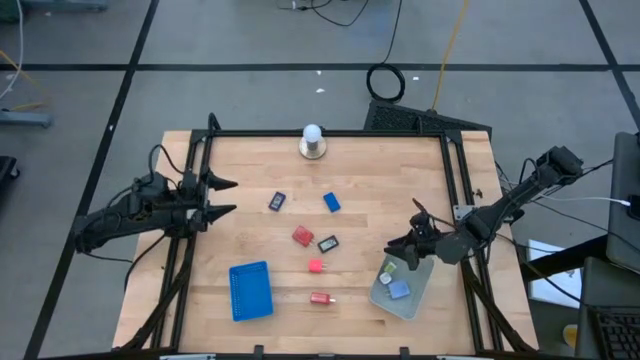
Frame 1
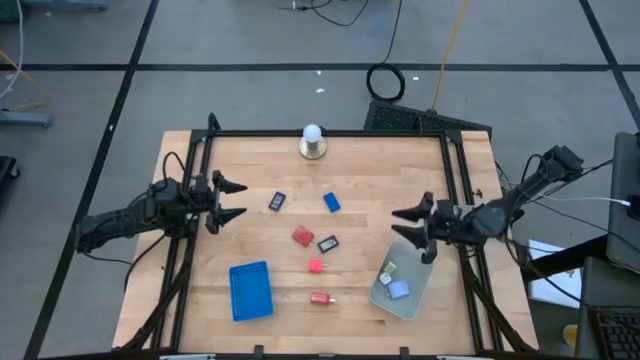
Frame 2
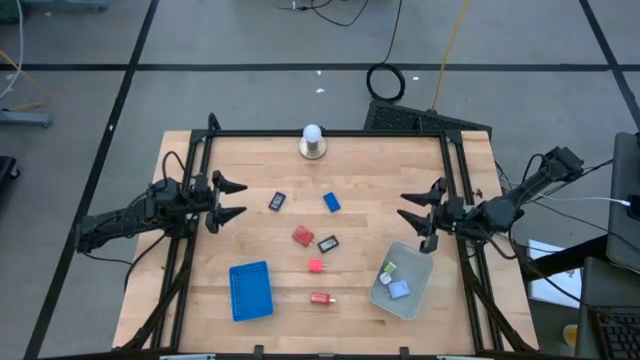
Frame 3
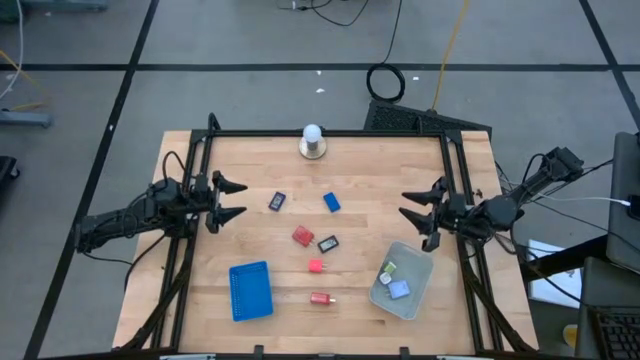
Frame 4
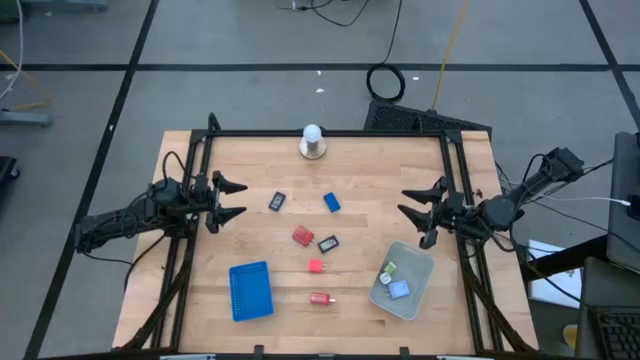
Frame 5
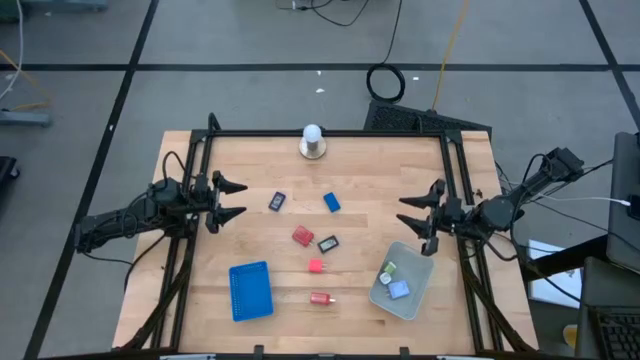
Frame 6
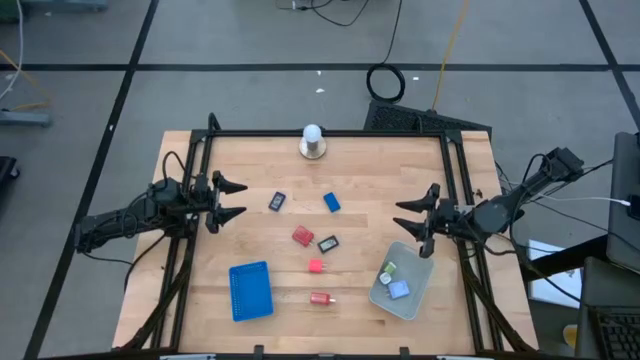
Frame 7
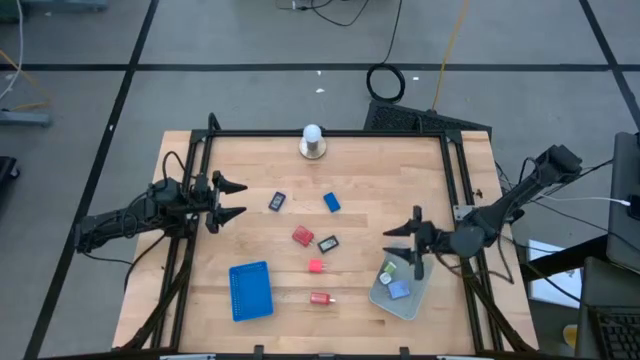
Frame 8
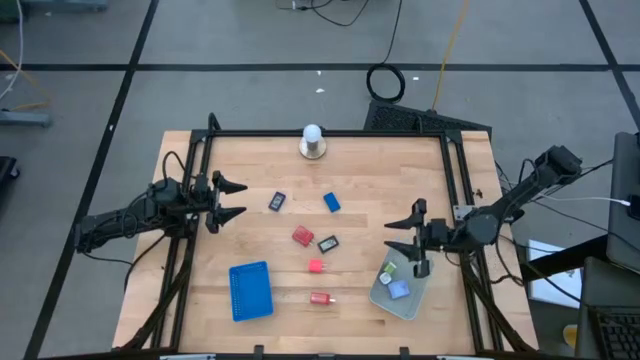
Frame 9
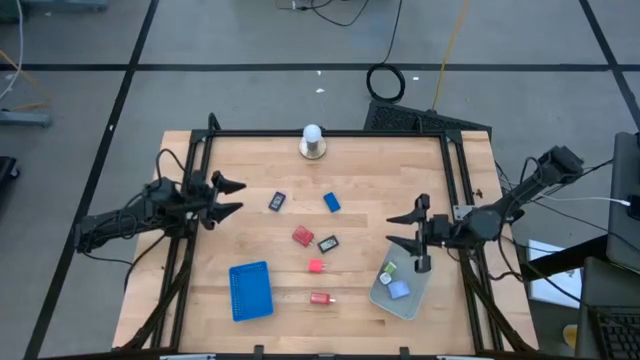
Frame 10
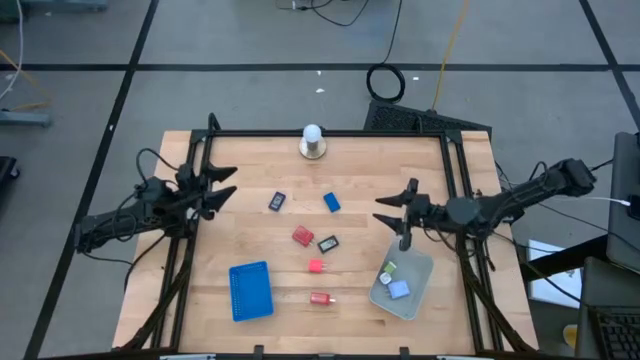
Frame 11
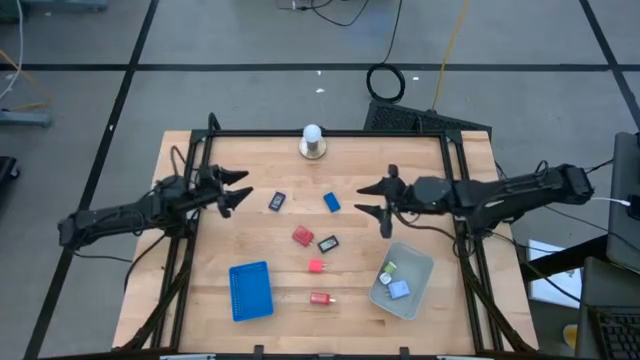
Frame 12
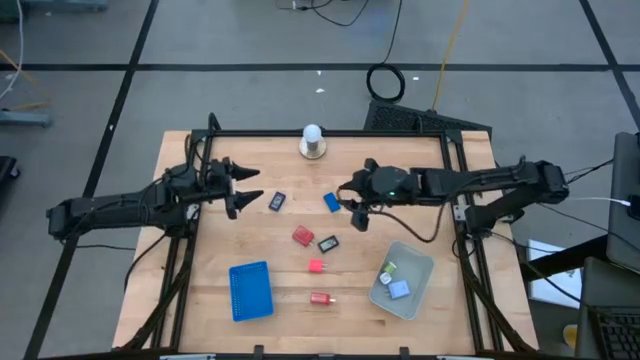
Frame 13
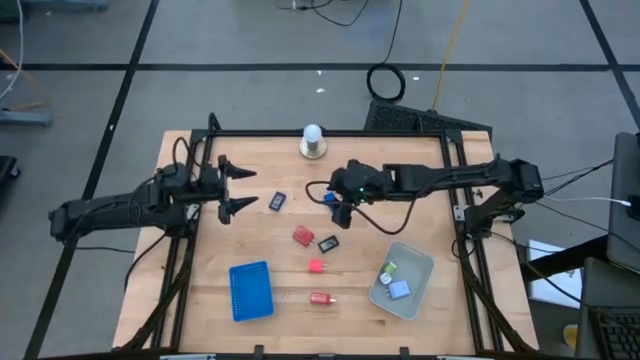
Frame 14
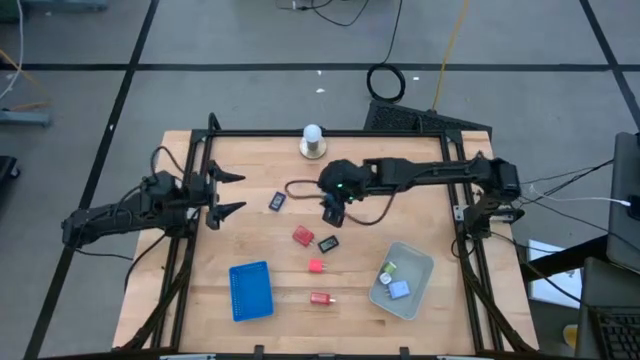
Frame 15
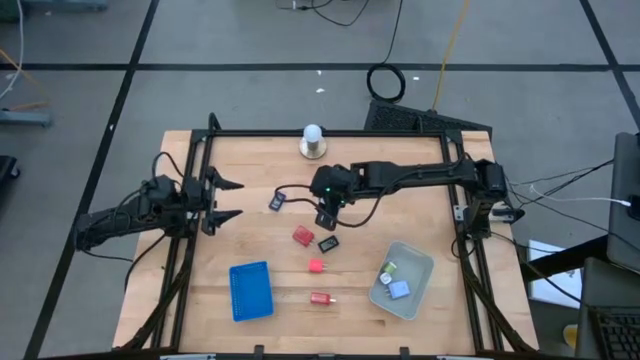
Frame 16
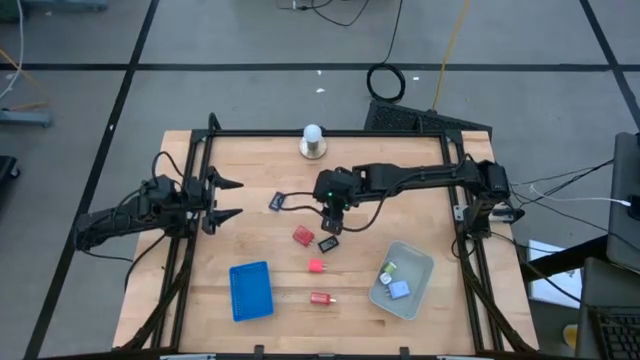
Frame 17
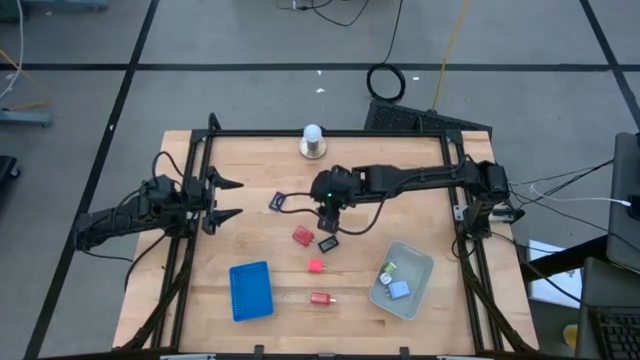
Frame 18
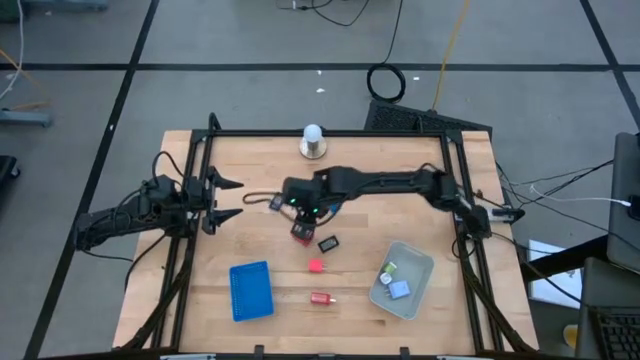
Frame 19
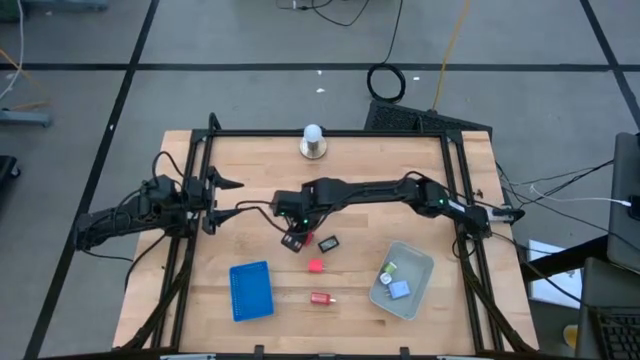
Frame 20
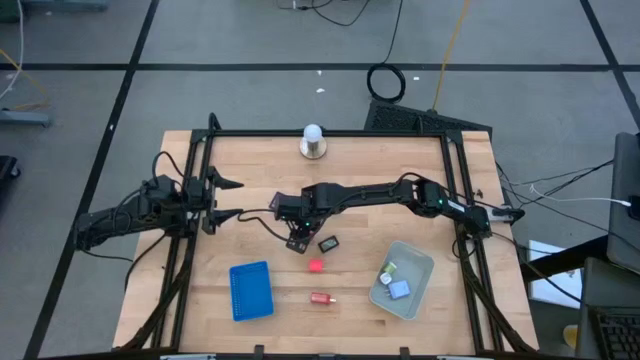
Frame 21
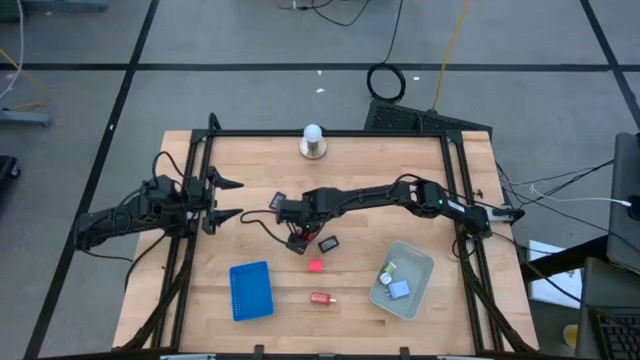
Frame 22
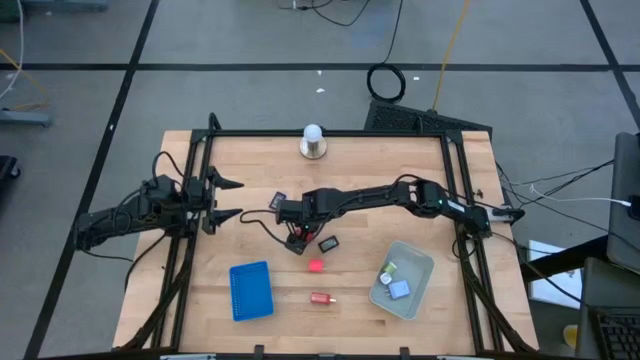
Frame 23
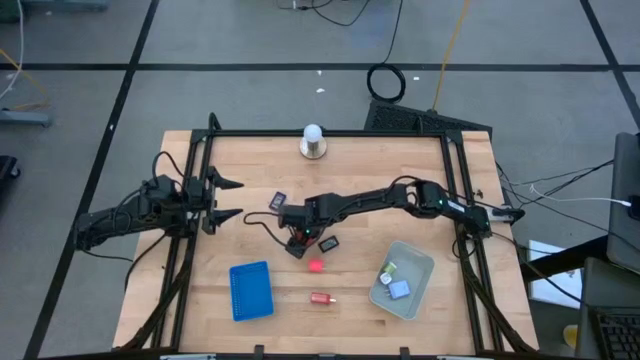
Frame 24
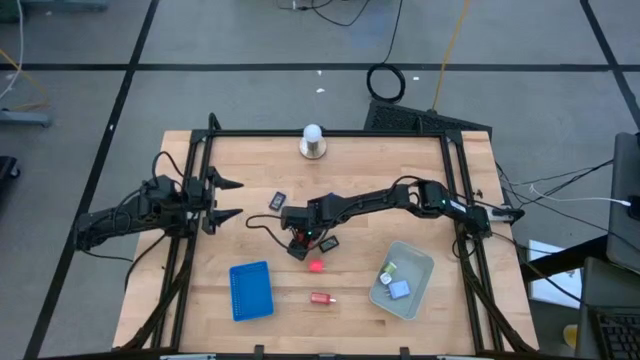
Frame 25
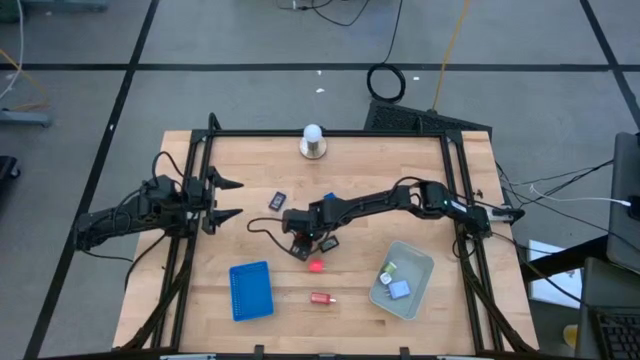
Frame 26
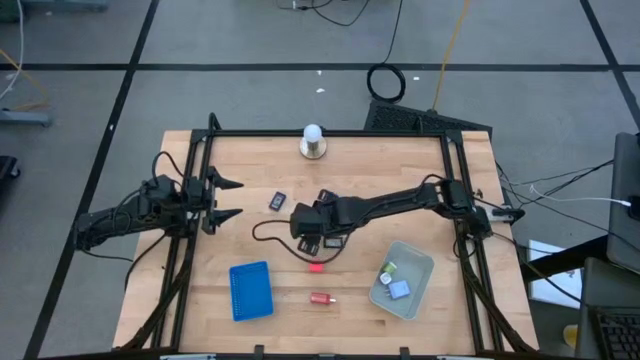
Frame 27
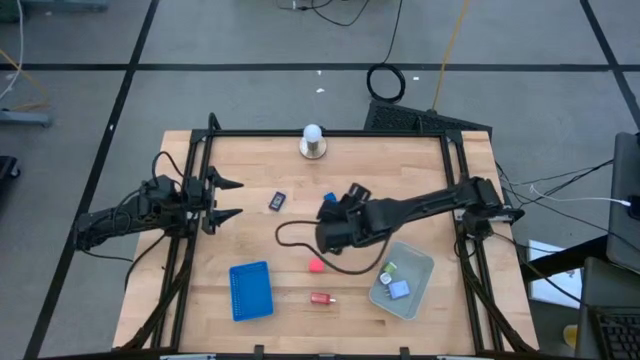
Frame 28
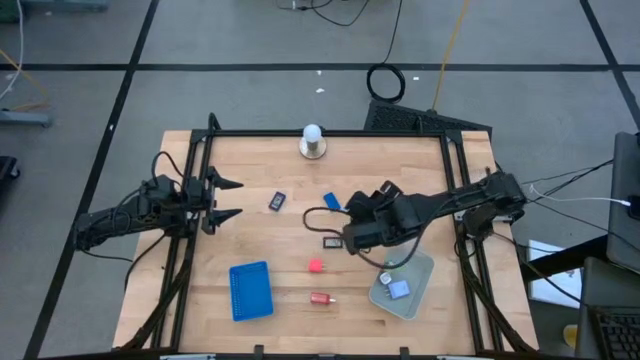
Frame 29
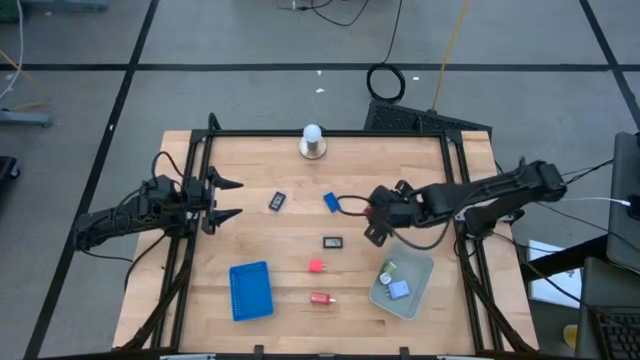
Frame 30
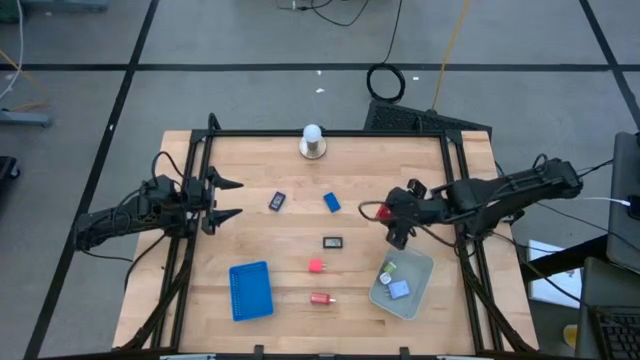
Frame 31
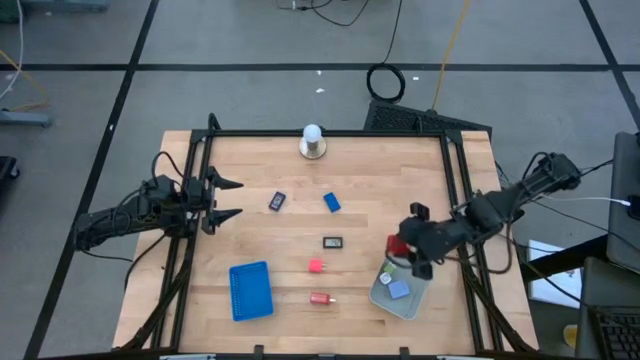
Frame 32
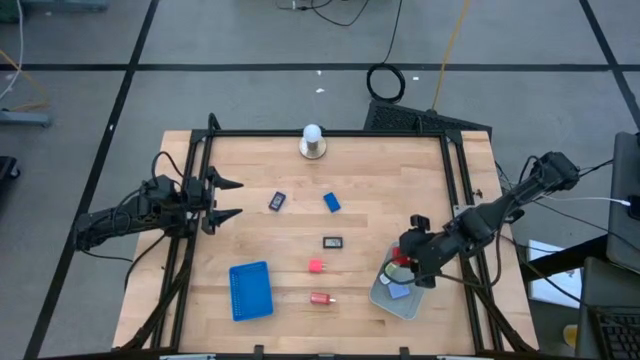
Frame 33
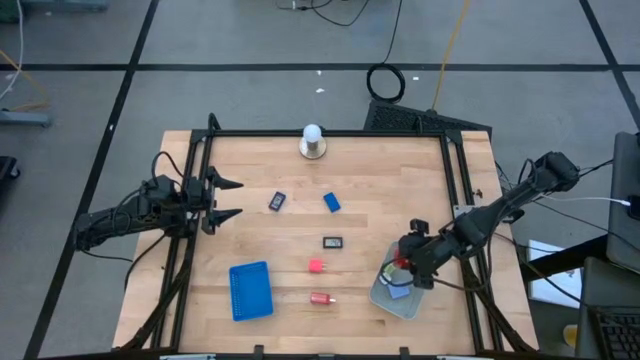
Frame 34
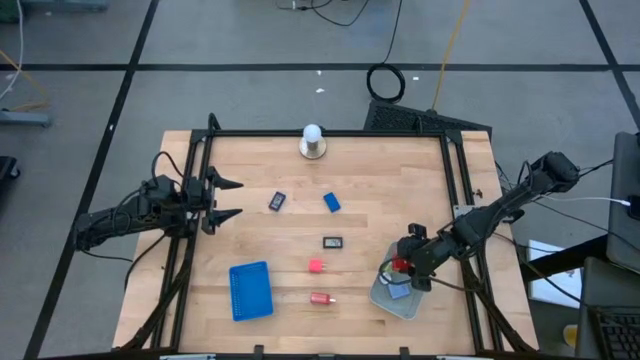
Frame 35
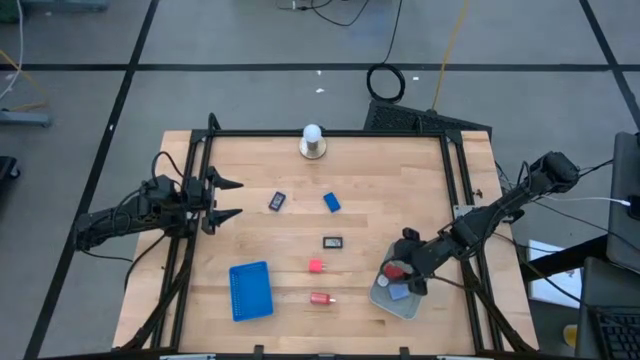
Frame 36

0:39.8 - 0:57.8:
Task: Pick & Place Office items
Put the top red charger adapter into the gray bin

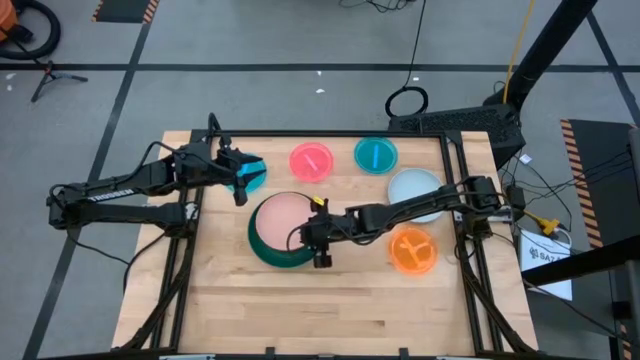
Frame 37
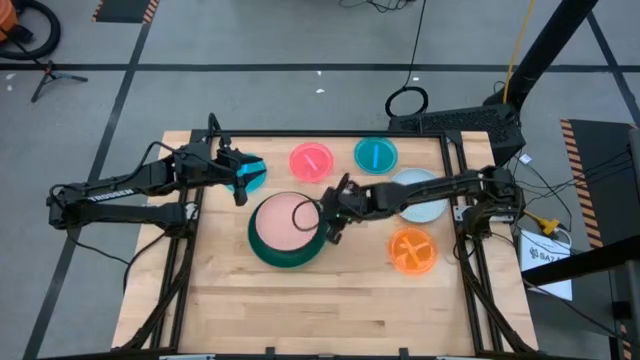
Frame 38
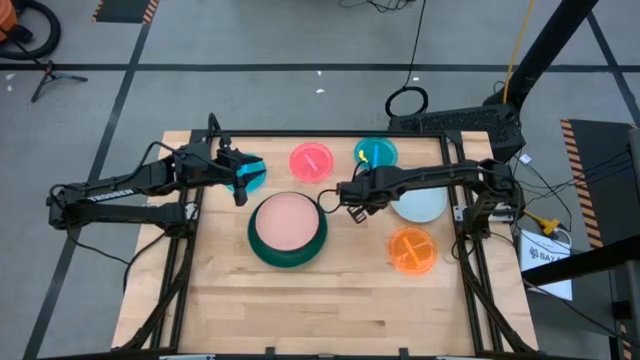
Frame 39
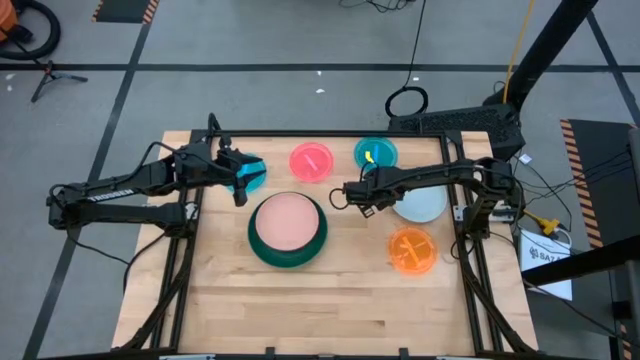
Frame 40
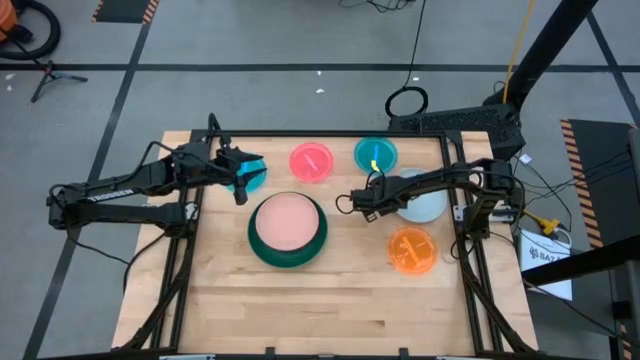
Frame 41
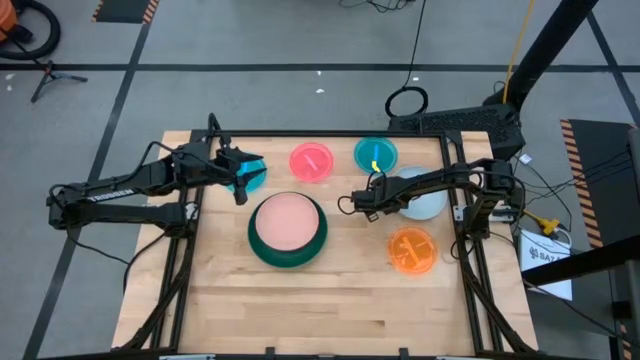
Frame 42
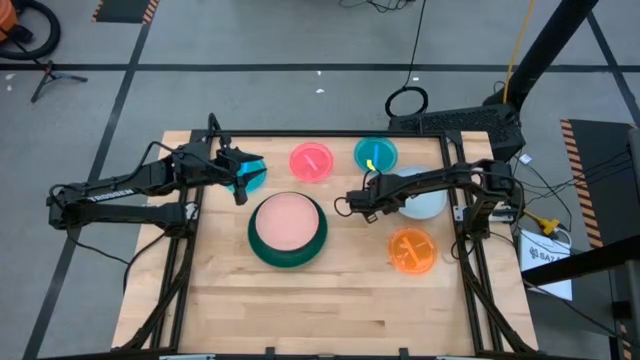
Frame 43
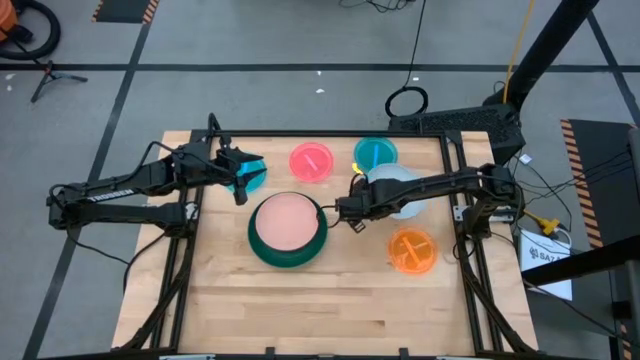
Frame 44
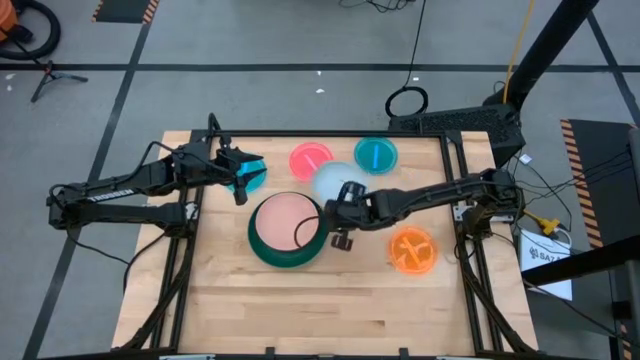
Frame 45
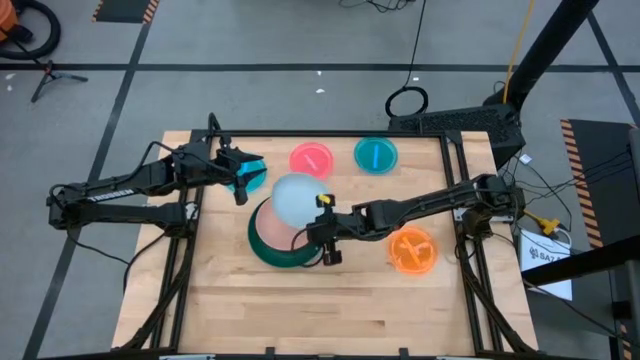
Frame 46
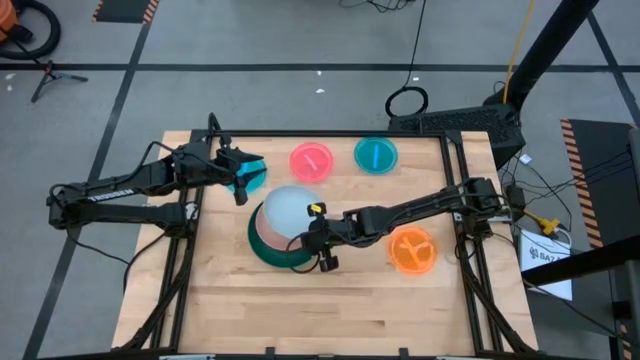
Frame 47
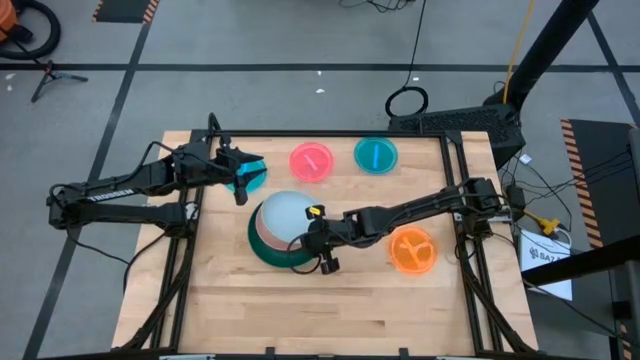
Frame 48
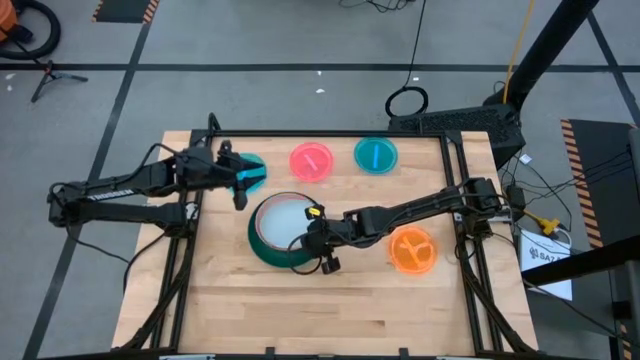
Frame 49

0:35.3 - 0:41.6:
Task: Stack plastic plates
Stack the blue plate on top of the pink plate
